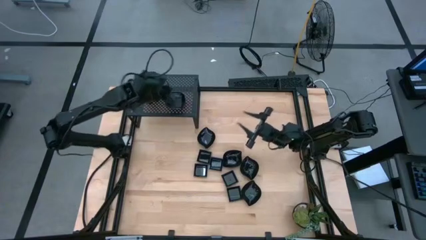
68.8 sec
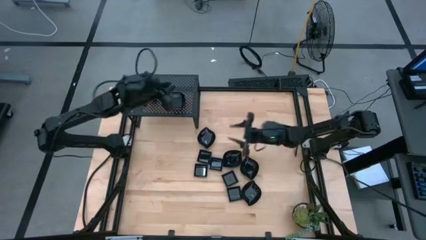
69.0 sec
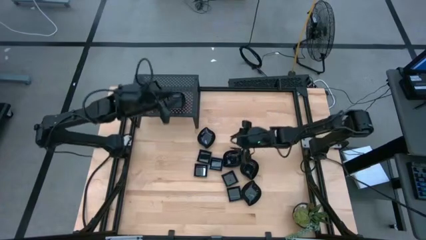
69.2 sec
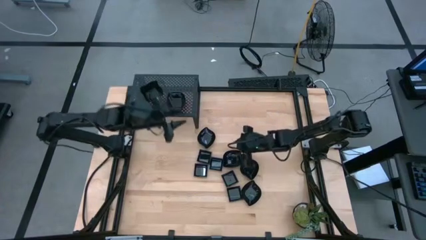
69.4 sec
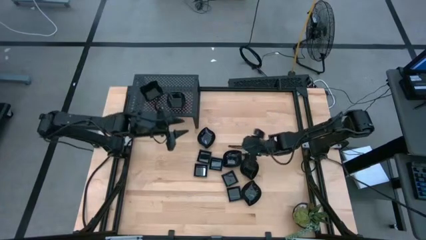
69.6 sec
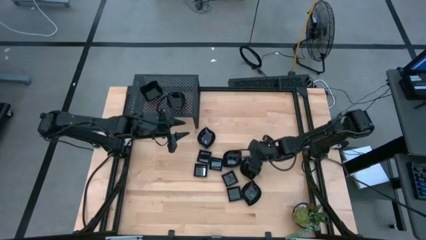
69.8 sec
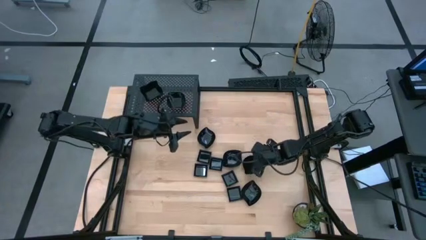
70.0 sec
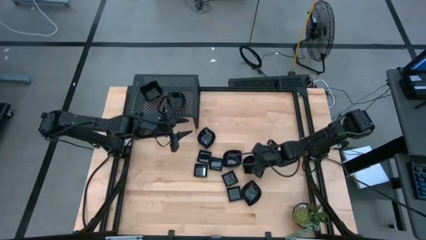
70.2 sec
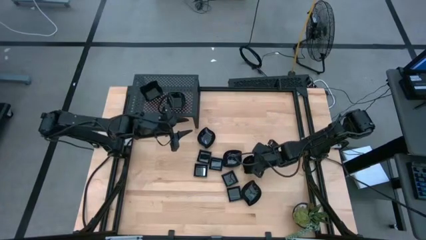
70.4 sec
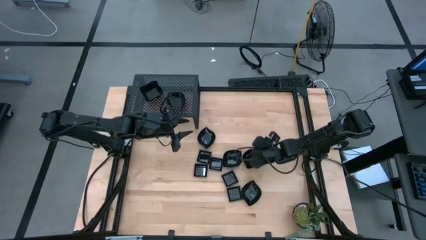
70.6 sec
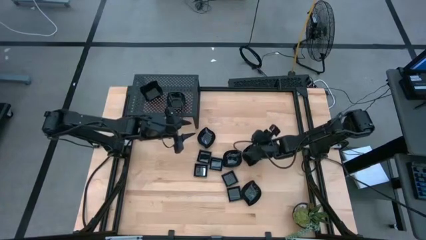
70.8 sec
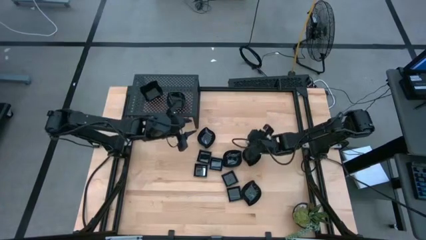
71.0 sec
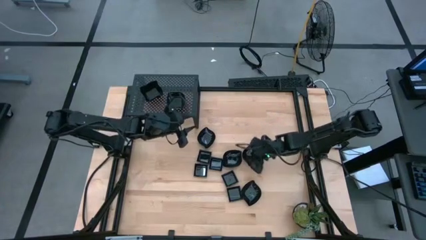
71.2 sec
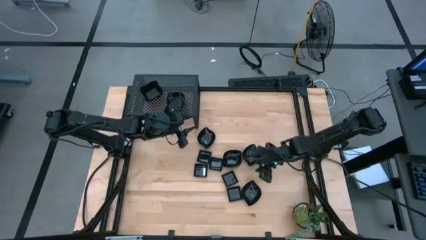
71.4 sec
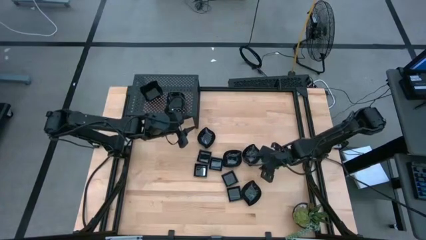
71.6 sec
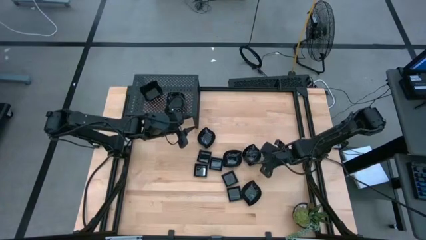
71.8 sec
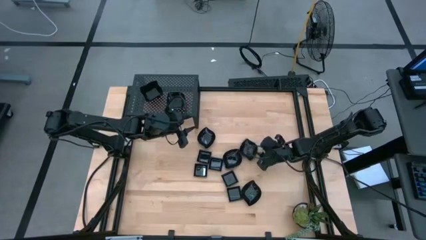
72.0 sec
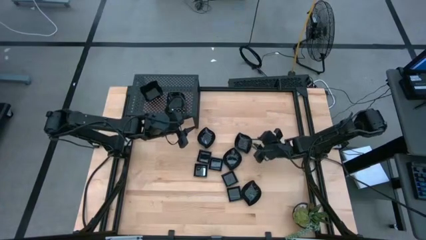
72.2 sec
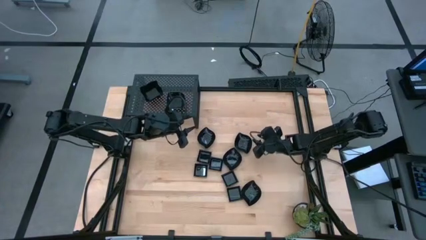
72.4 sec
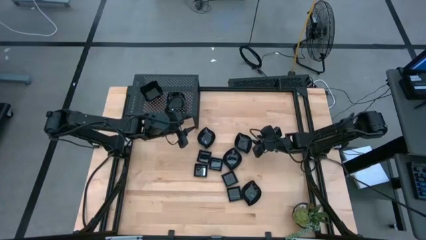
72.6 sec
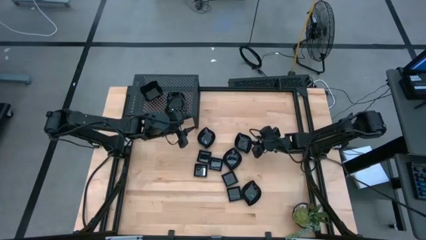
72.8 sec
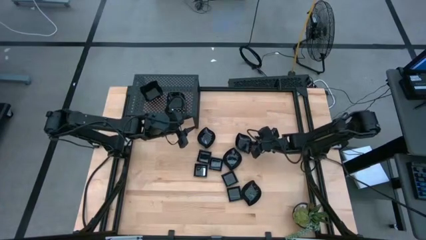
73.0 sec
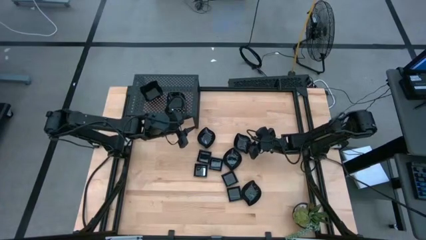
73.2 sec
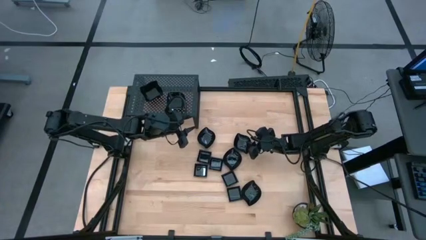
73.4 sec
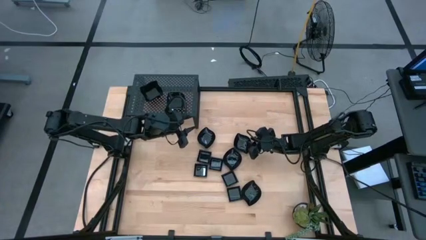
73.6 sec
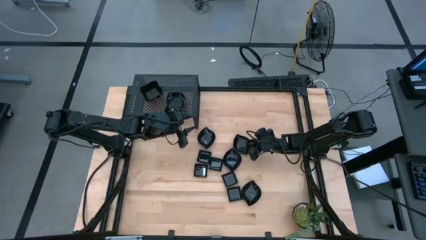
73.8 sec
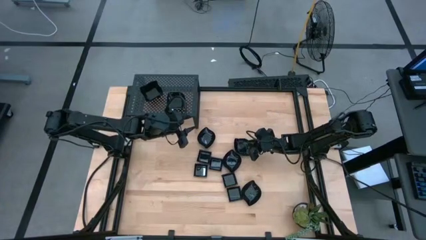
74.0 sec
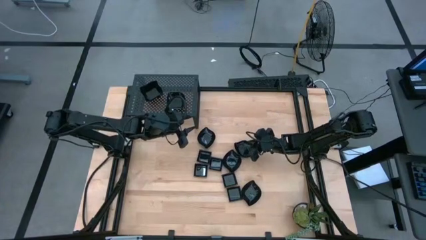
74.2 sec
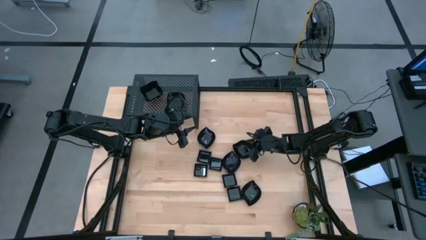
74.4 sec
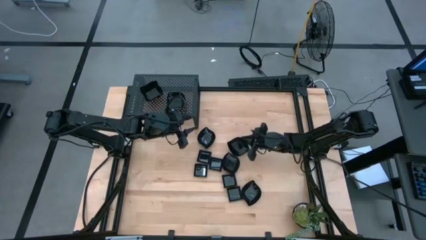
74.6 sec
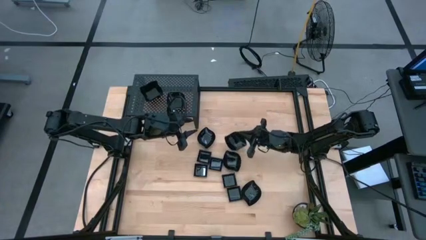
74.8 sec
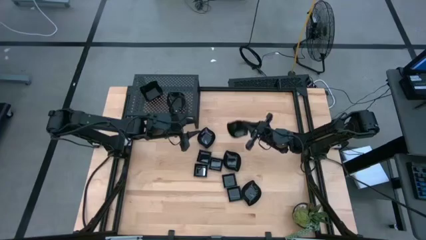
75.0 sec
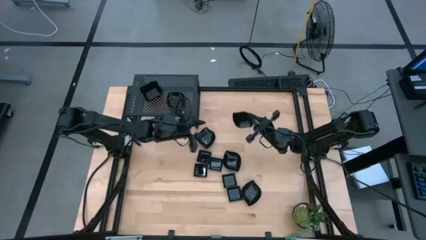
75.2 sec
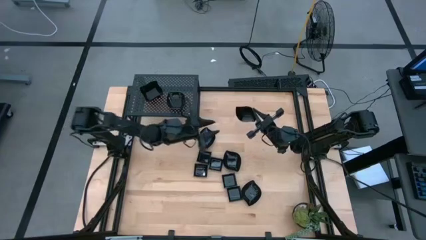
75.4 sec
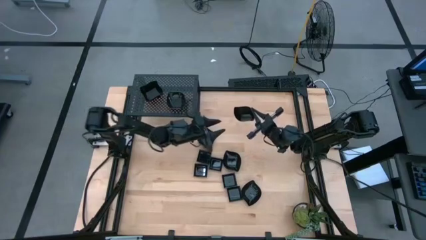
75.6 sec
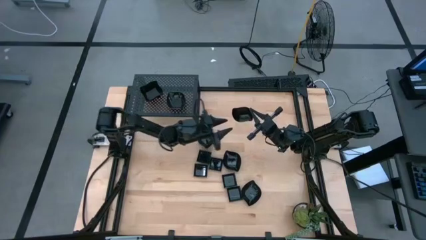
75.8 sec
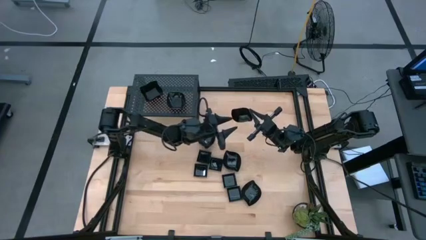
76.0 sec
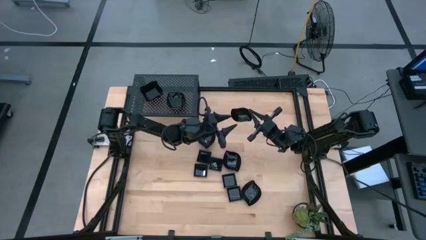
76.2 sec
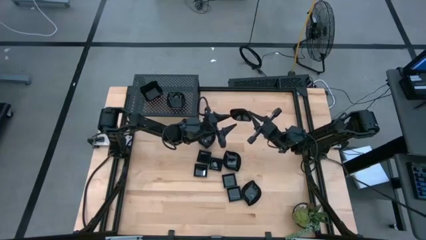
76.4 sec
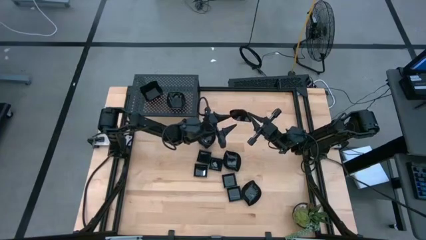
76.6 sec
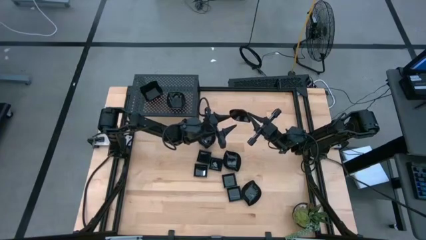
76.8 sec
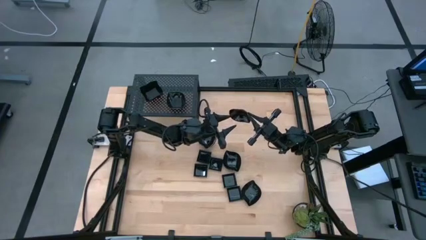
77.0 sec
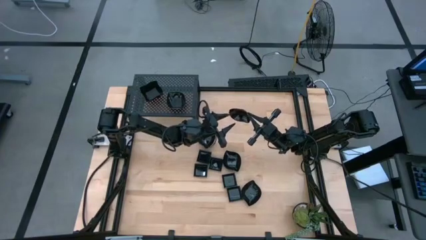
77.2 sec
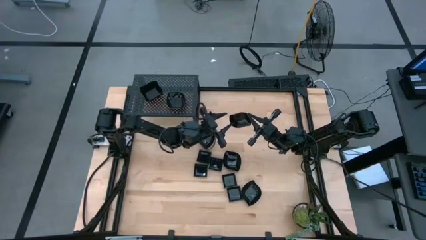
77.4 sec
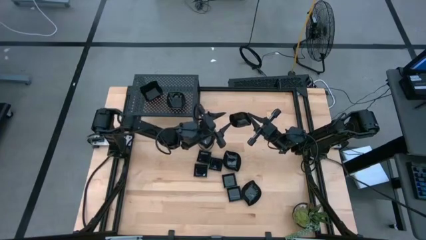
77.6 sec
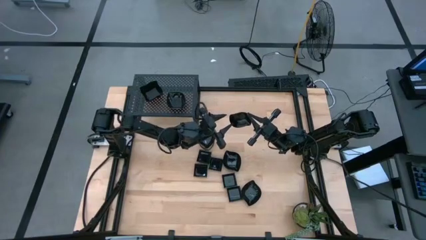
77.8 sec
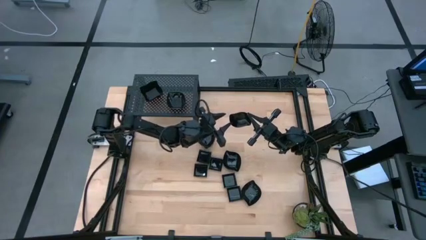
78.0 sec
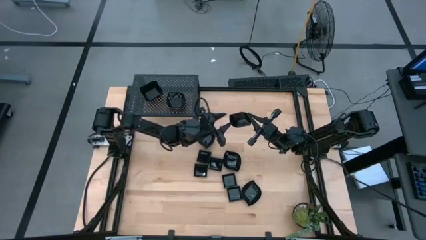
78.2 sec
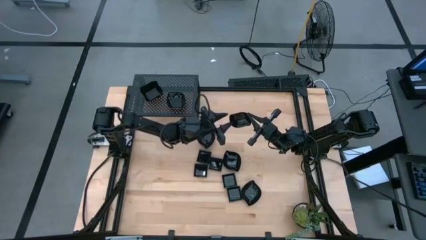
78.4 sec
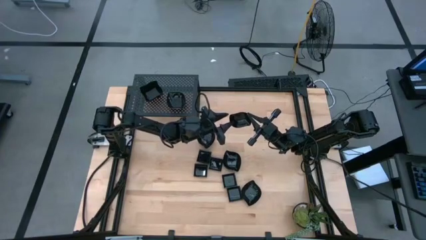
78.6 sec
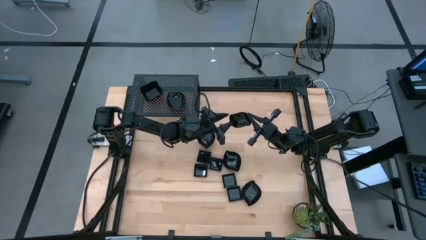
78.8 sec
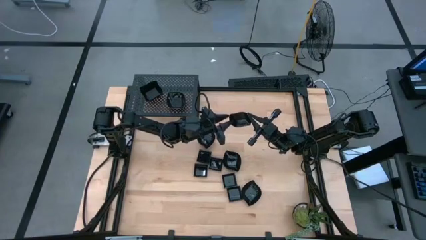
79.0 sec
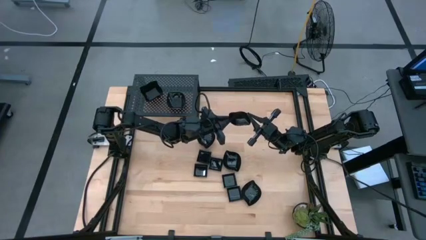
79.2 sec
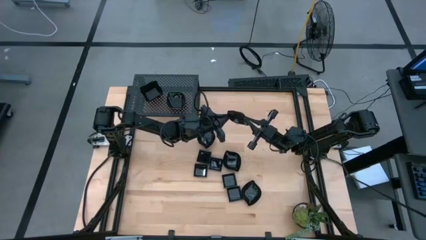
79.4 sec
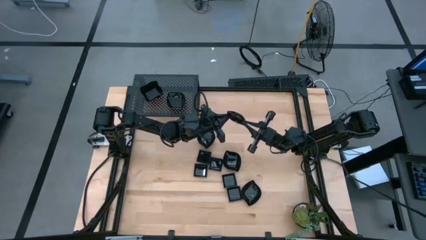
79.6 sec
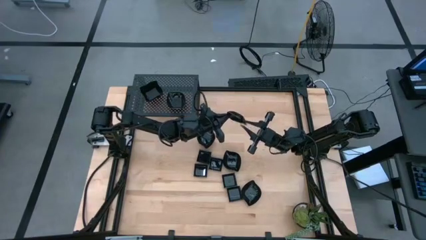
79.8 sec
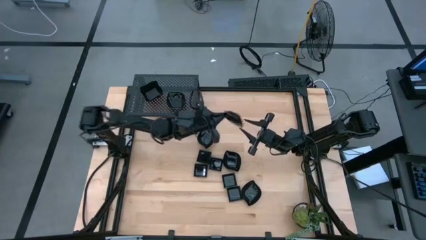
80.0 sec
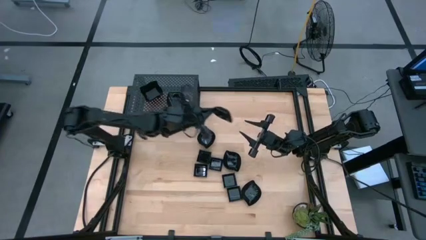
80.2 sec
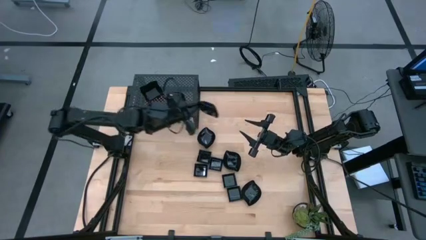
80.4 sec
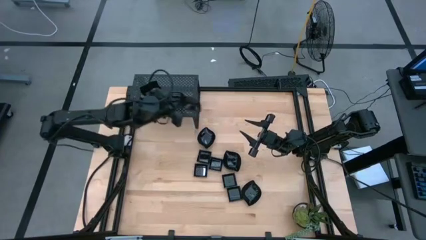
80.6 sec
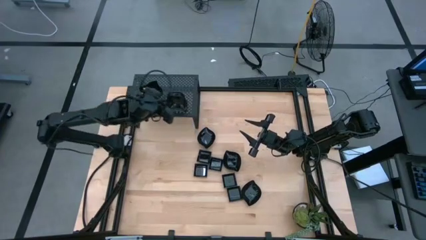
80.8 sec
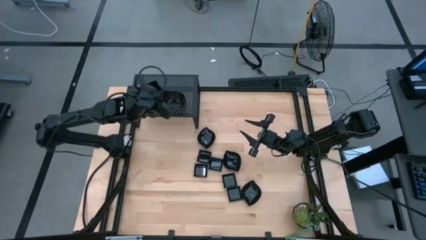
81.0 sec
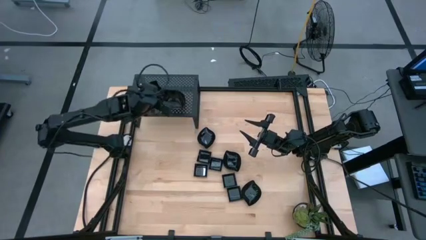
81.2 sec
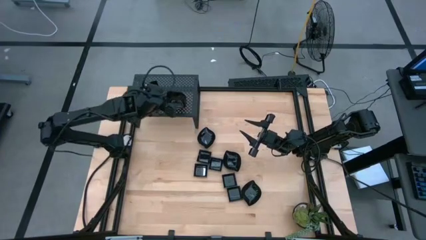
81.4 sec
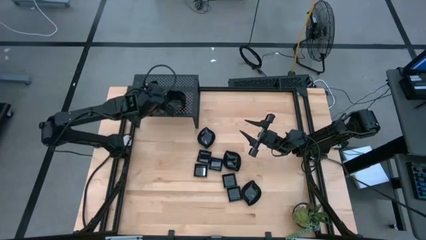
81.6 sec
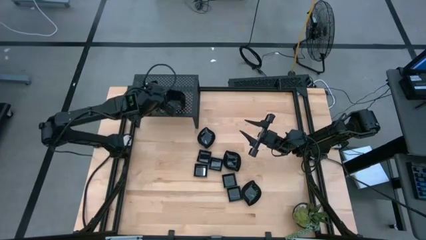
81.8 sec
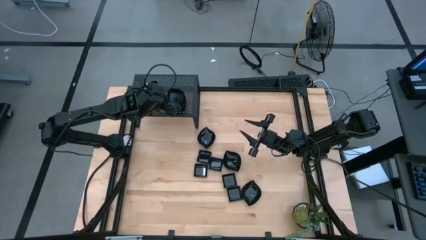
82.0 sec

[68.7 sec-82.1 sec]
Task: Pick & Place Mini shaped plates
Stack the leaf shaped plate on top of the leaf shaped plate on the shelf
